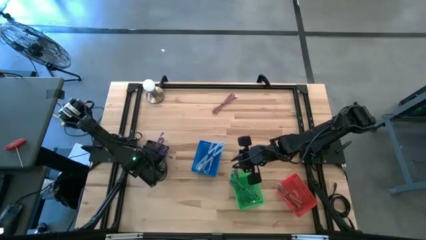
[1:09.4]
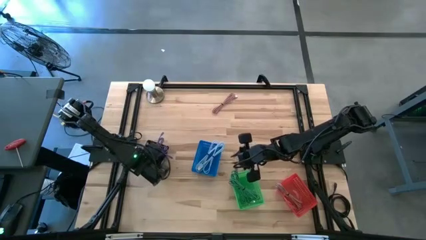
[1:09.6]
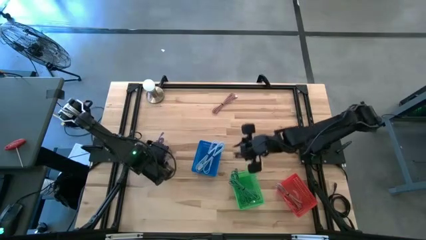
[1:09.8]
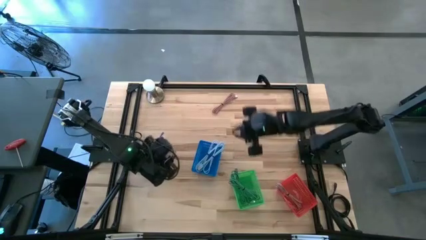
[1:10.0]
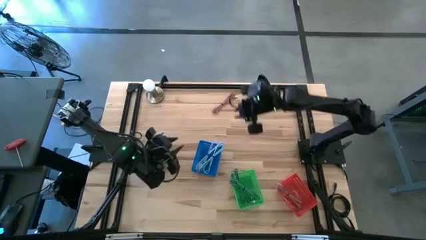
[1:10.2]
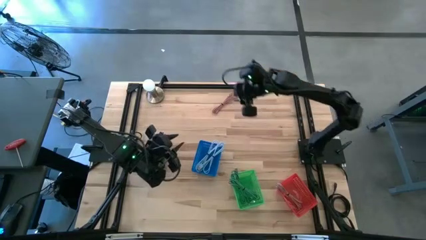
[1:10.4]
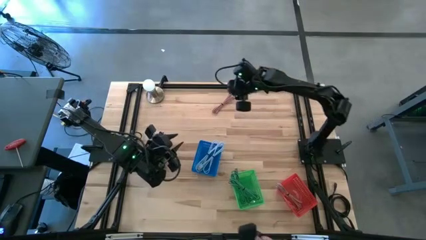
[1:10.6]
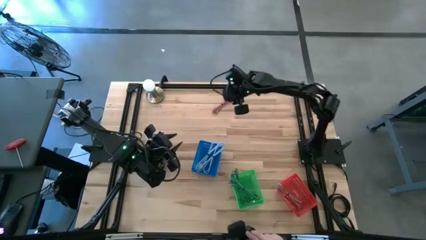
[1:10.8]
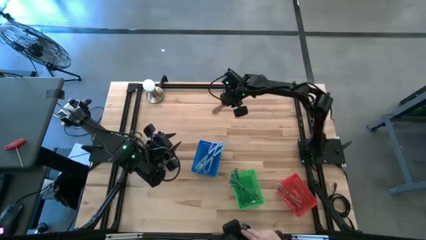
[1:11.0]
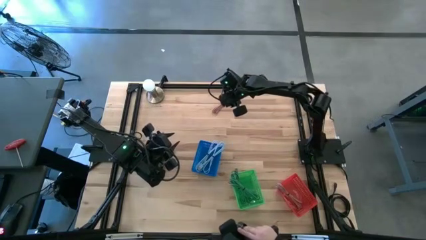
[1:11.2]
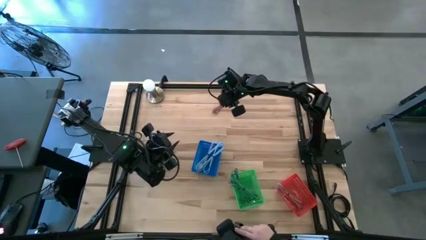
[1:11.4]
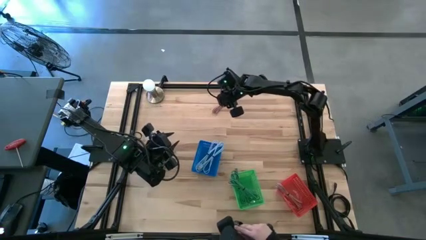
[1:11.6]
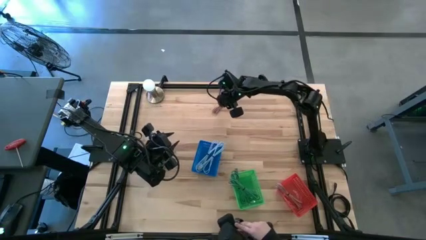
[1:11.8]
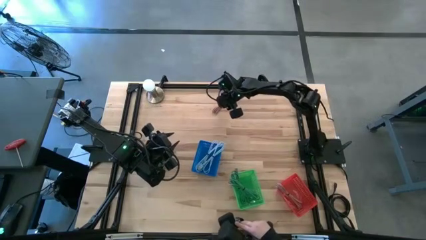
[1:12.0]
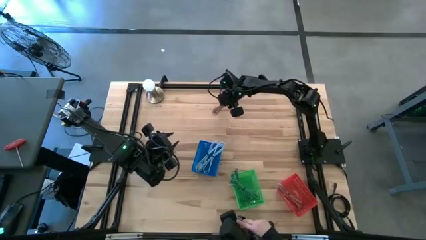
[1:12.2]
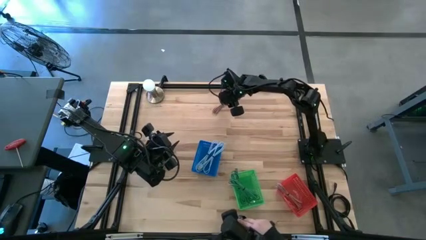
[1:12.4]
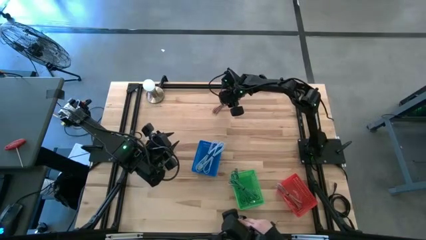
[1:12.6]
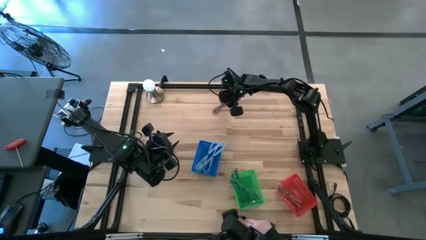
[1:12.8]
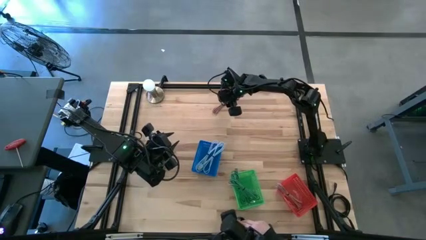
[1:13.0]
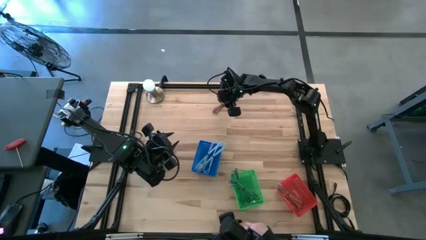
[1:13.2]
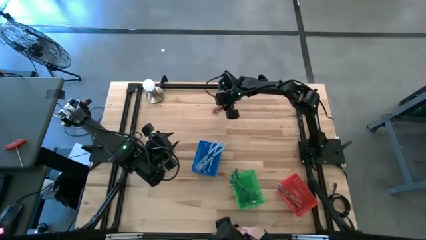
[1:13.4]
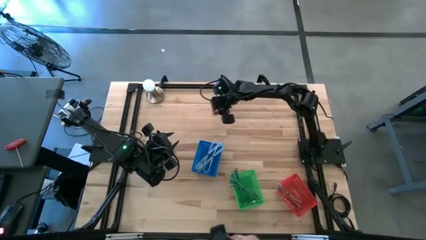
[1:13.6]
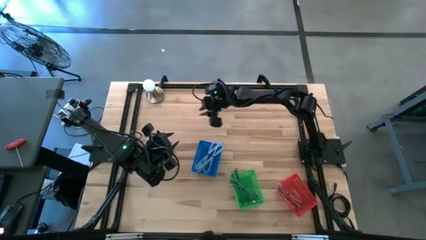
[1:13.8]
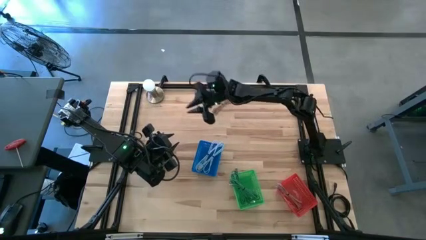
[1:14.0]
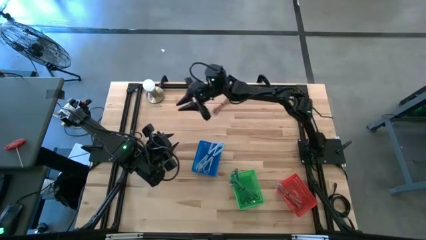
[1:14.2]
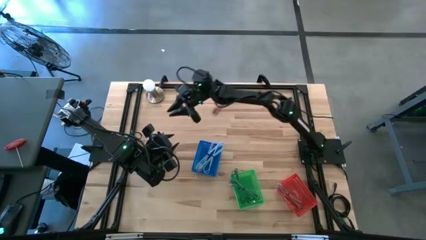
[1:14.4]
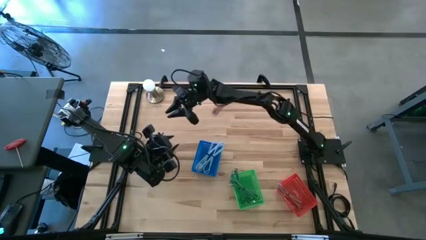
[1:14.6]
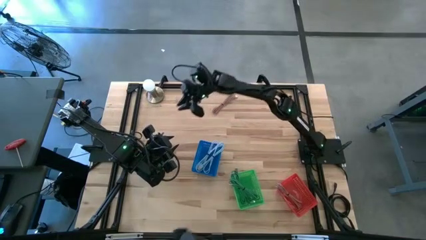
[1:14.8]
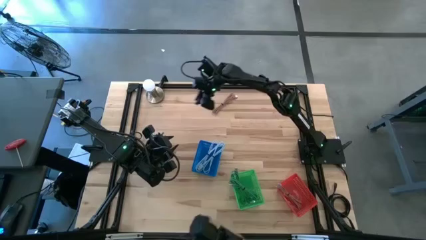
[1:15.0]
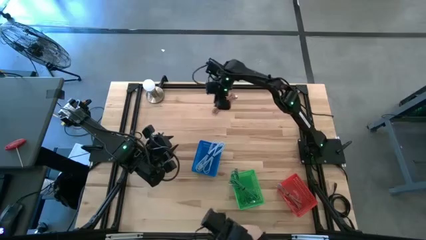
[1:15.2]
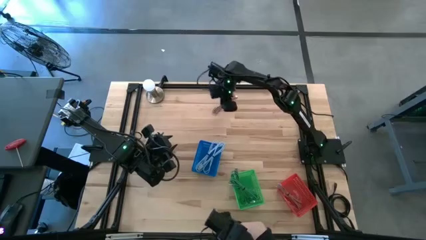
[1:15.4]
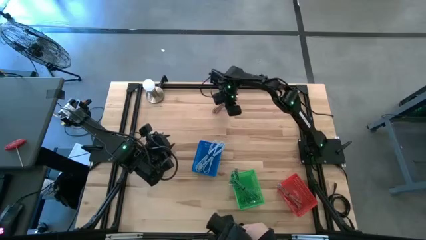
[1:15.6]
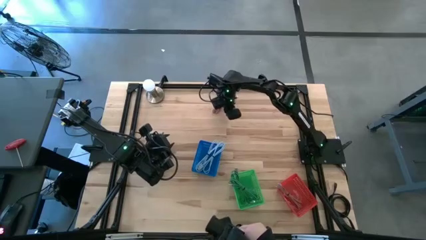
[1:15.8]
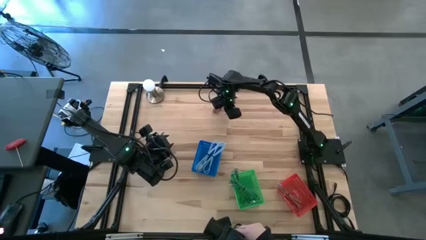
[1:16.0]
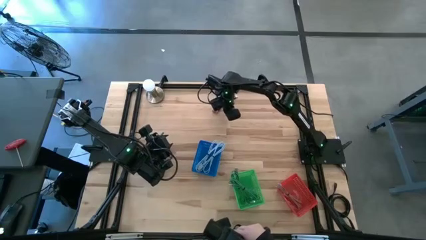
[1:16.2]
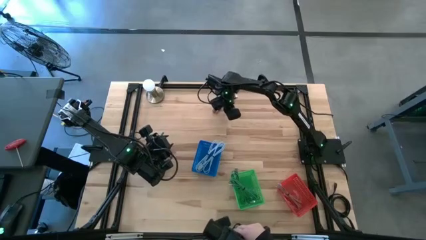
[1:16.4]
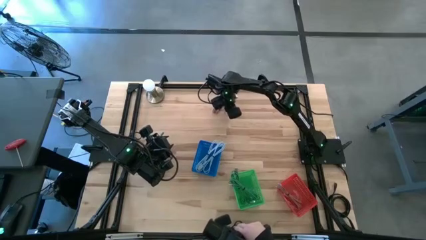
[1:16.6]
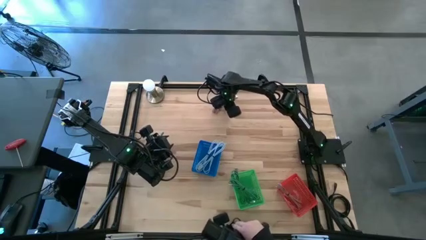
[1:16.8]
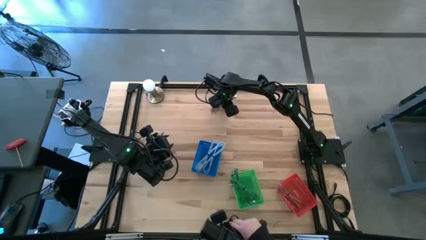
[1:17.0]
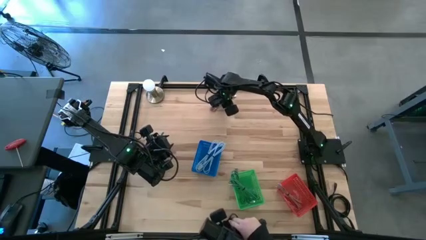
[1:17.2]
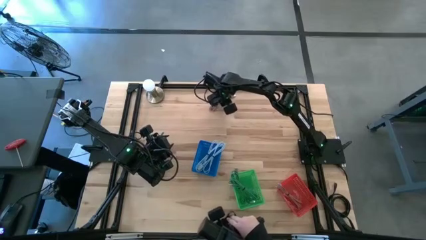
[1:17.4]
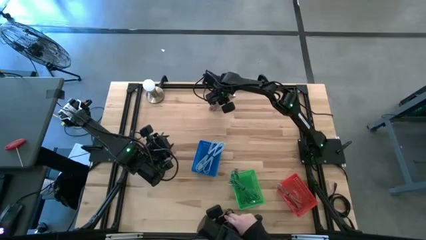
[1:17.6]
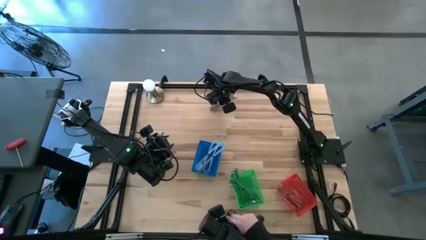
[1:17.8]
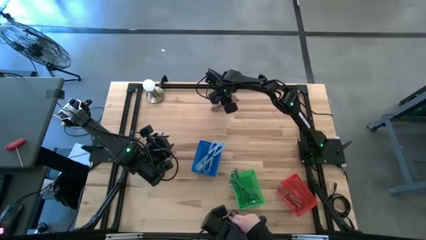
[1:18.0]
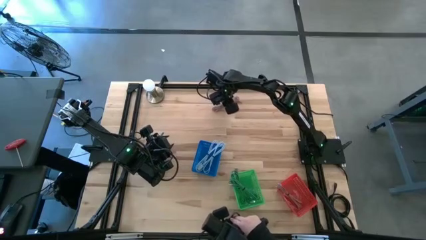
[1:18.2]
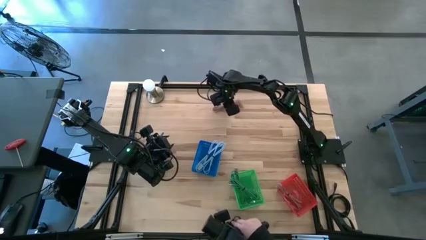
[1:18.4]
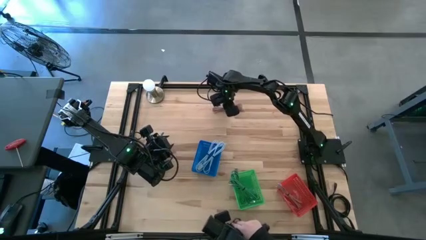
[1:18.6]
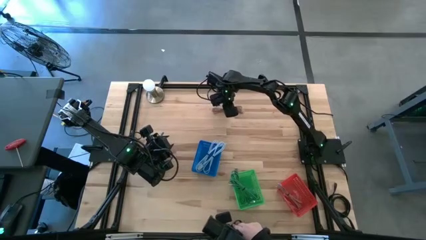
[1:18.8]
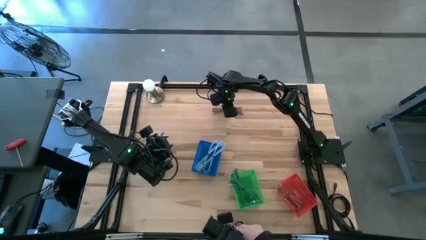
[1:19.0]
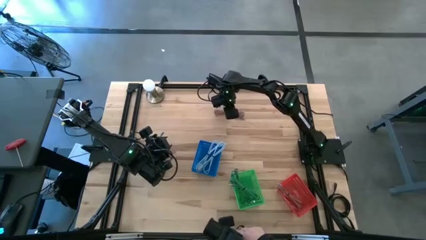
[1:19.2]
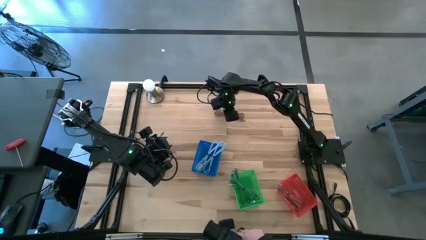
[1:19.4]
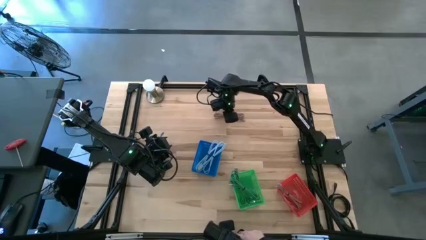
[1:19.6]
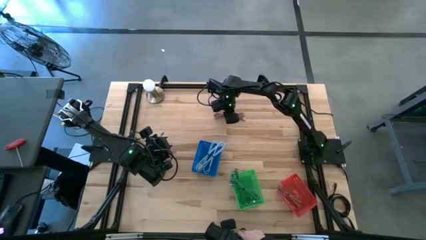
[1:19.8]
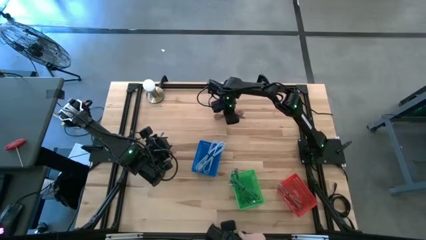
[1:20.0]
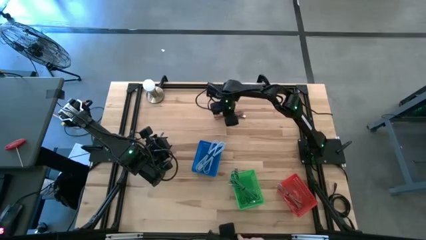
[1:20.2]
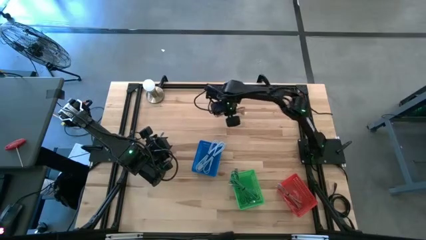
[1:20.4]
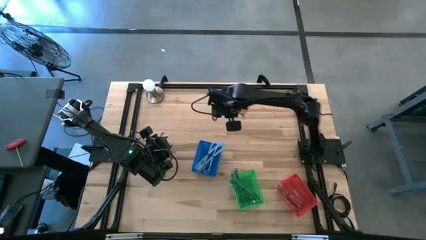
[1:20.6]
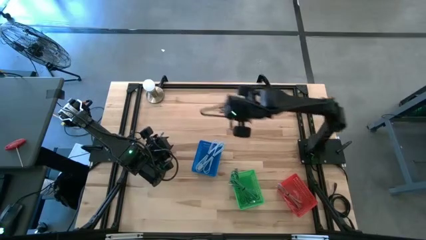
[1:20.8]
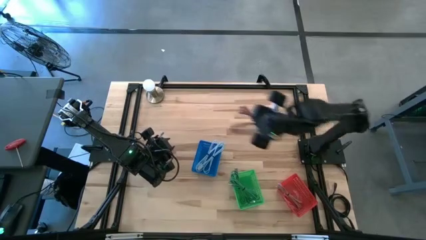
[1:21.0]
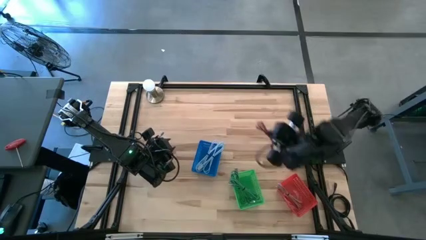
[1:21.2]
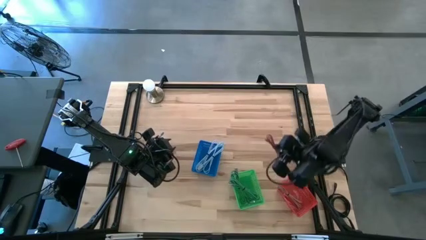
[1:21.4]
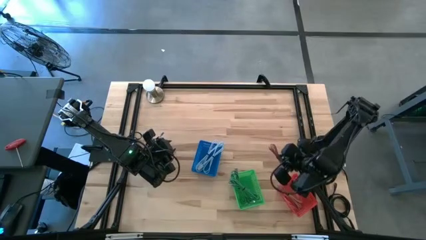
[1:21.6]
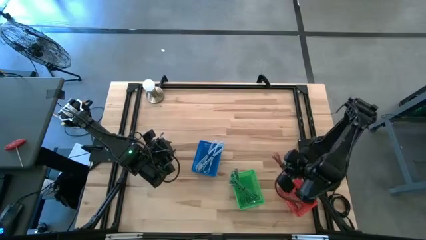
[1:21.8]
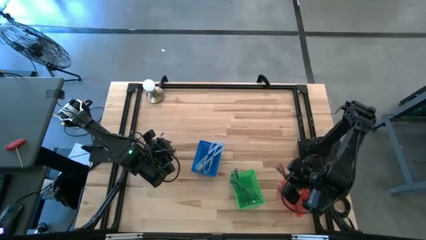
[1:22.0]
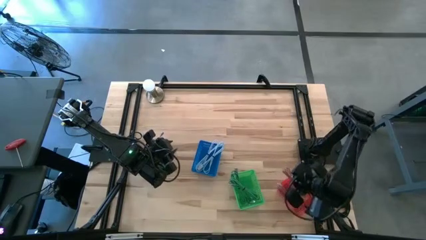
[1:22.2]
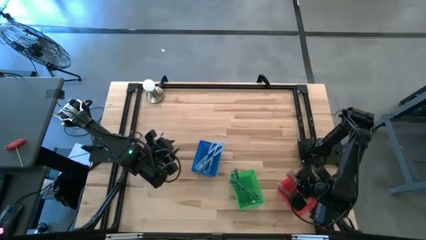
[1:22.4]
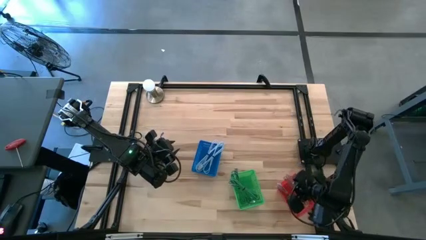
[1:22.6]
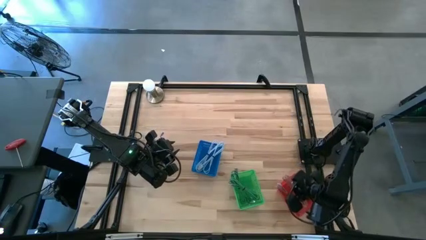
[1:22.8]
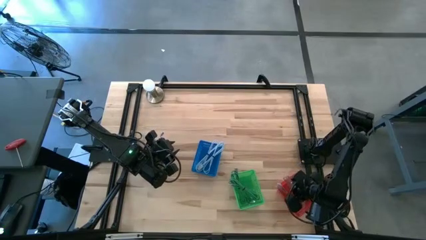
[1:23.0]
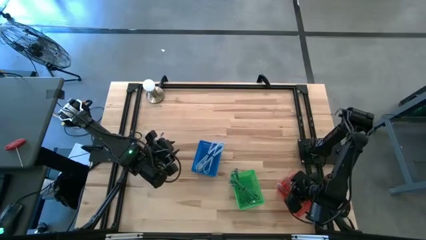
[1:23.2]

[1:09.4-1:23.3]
Task: Pick & Place USB Port
Put the pink USB cable into the red bin

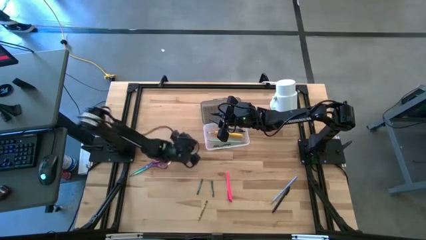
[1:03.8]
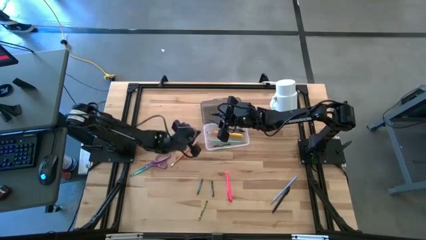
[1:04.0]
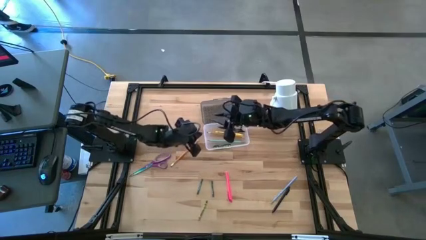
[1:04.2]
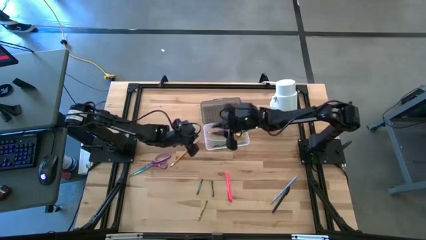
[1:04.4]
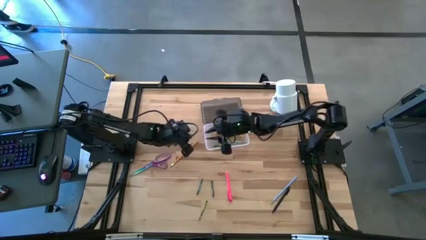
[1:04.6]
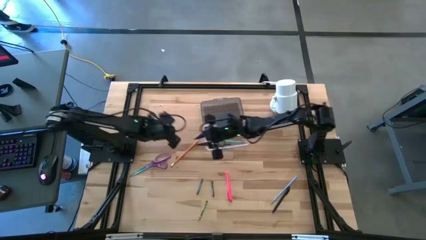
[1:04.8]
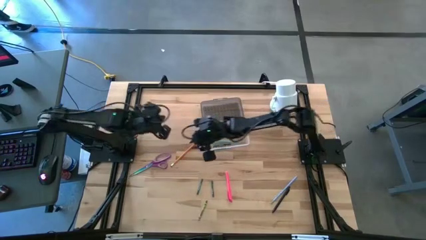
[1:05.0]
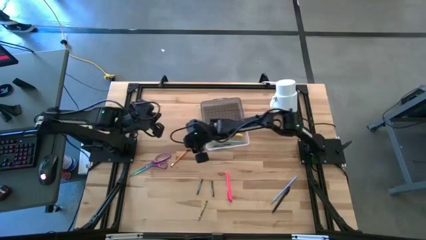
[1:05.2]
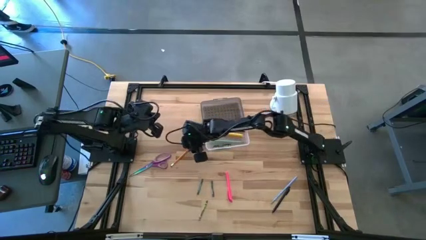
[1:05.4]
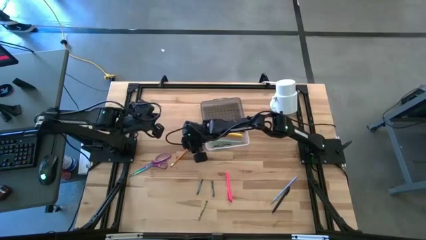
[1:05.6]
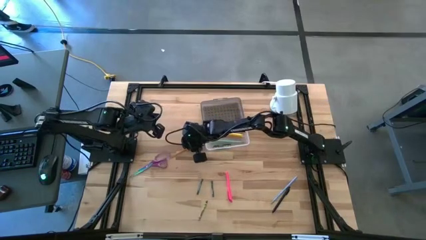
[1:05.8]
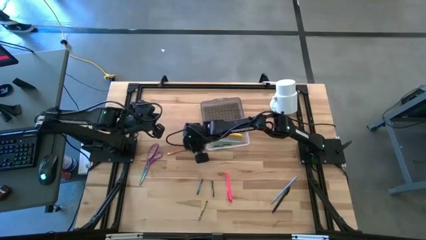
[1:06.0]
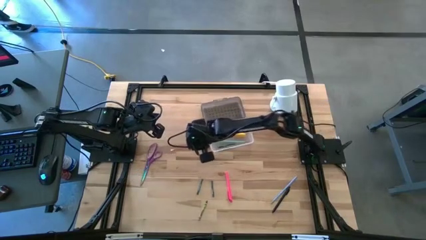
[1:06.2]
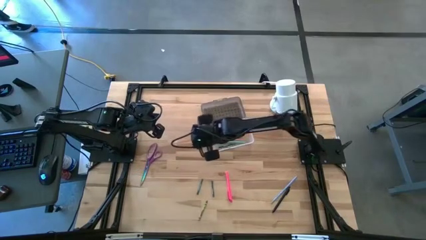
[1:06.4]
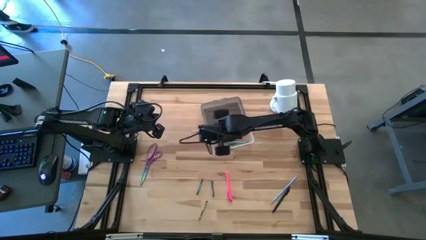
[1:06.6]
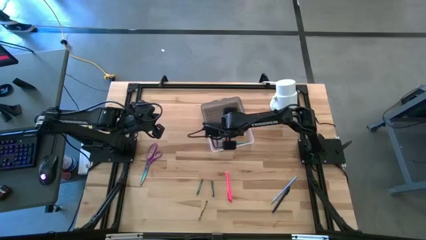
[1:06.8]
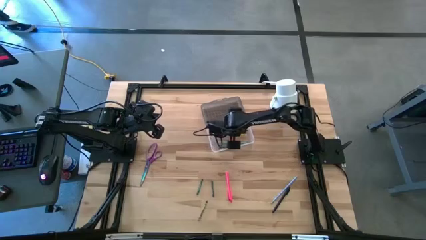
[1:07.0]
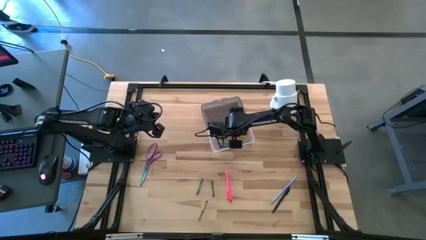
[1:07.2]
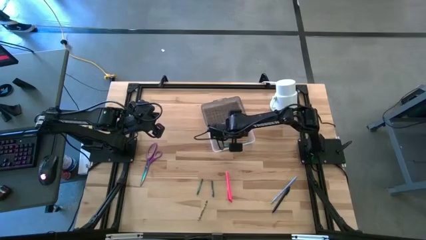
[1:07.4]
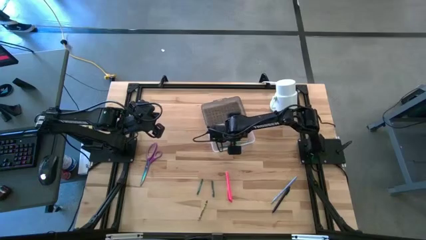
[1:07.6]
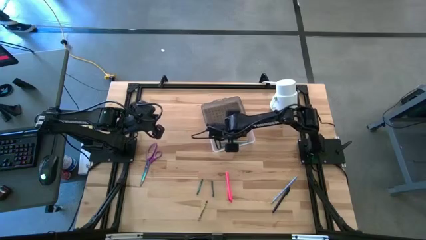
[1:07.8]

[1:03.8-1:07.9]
Task: Pick & place school supplies into a supply box
Put the orange pencil into the gray supply box
